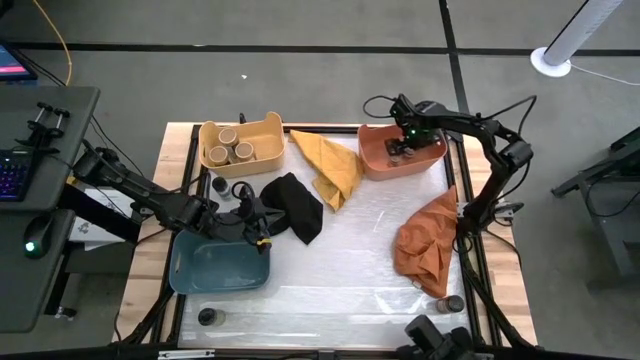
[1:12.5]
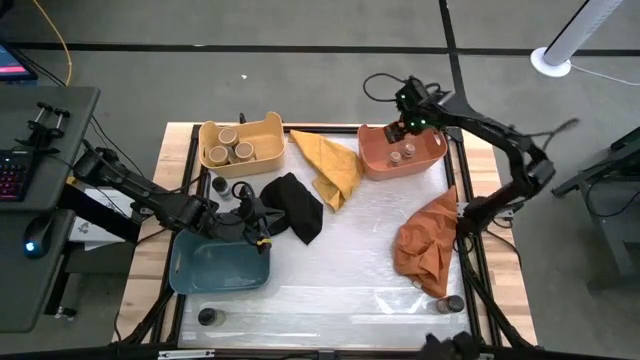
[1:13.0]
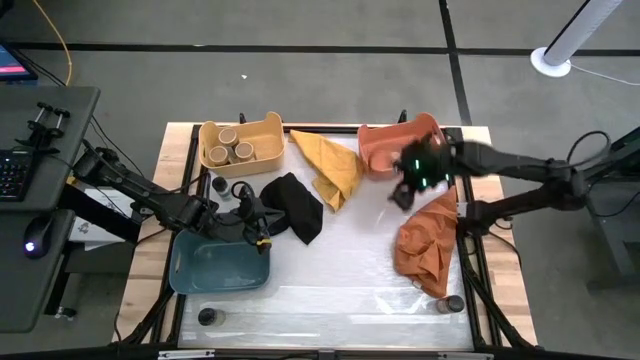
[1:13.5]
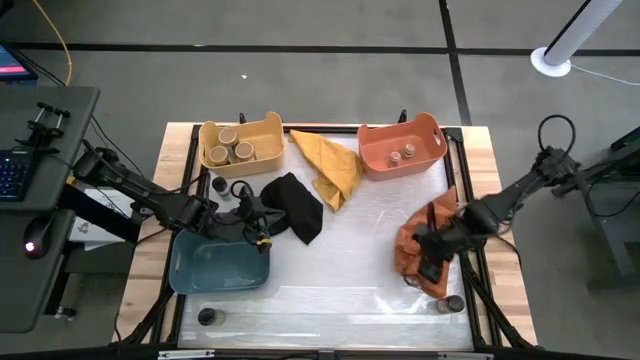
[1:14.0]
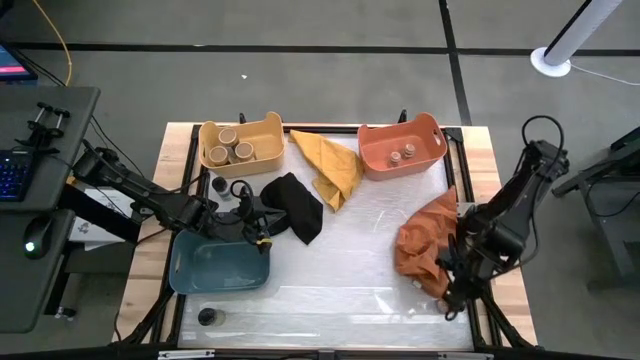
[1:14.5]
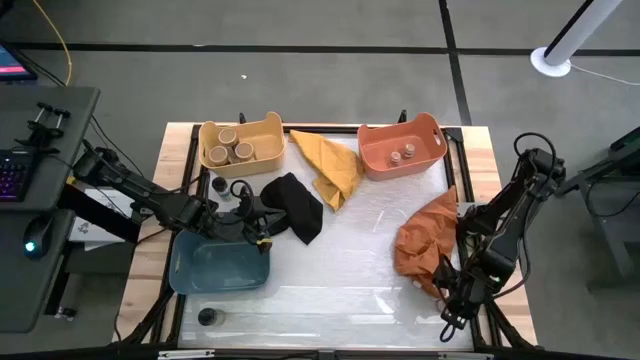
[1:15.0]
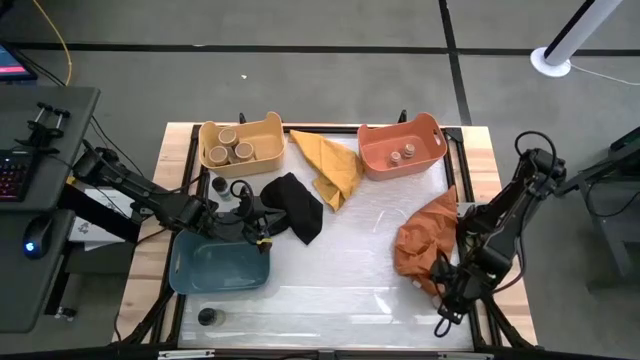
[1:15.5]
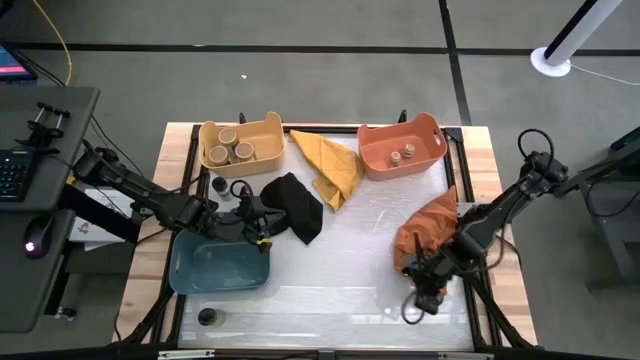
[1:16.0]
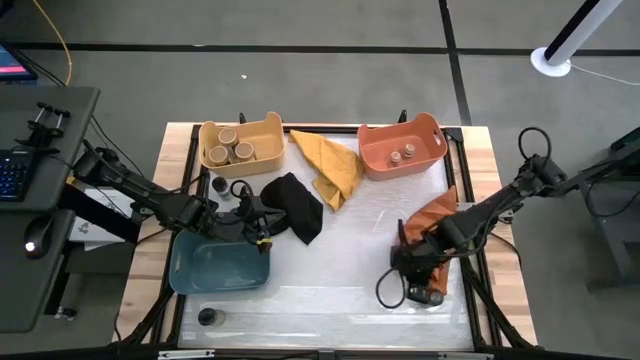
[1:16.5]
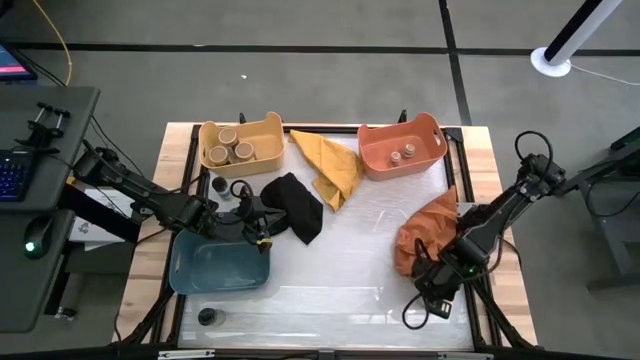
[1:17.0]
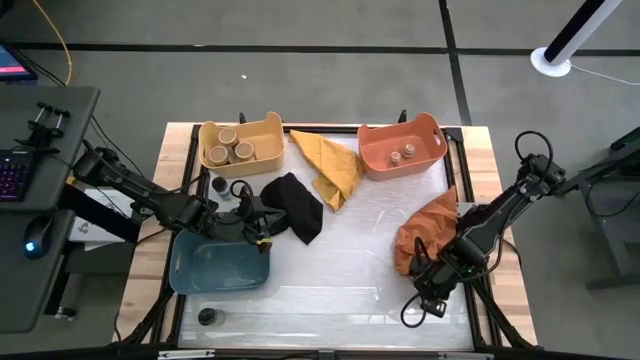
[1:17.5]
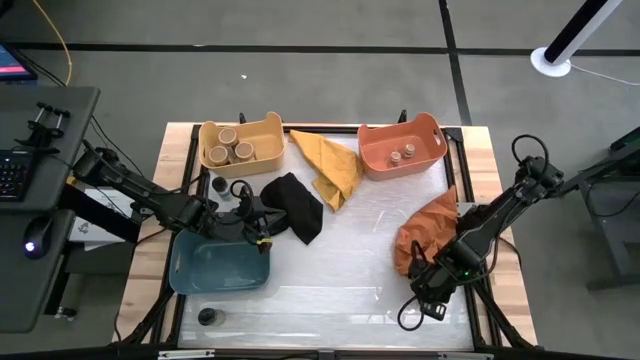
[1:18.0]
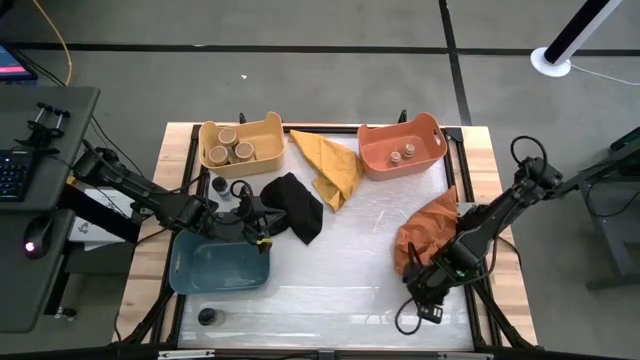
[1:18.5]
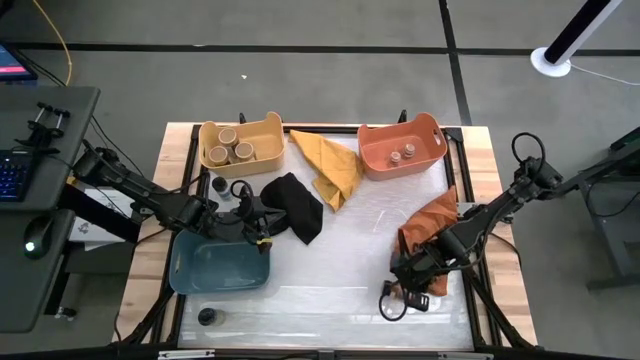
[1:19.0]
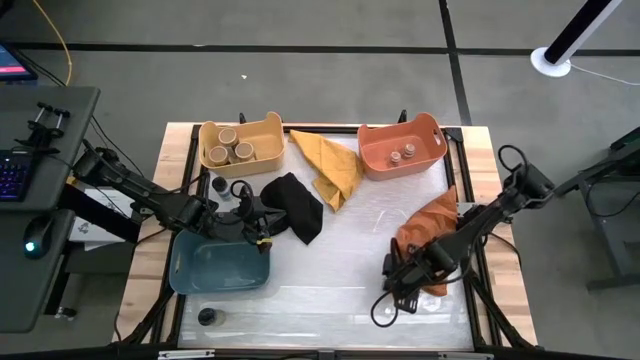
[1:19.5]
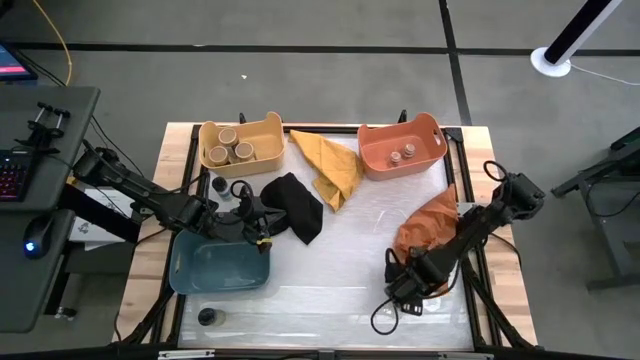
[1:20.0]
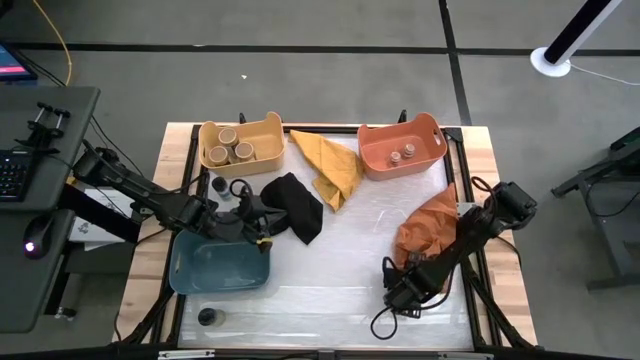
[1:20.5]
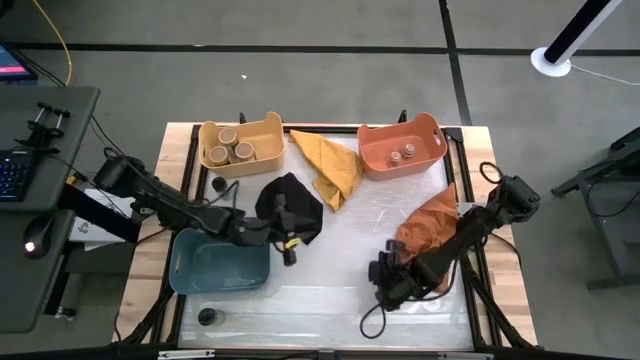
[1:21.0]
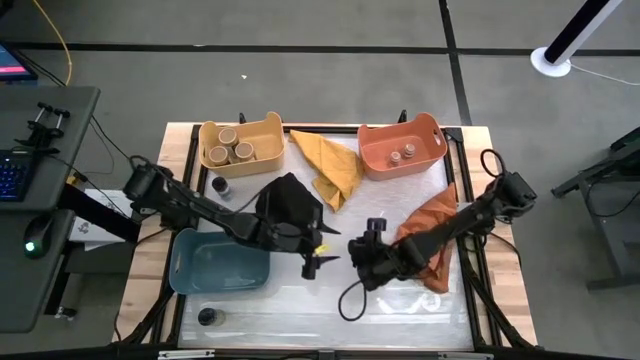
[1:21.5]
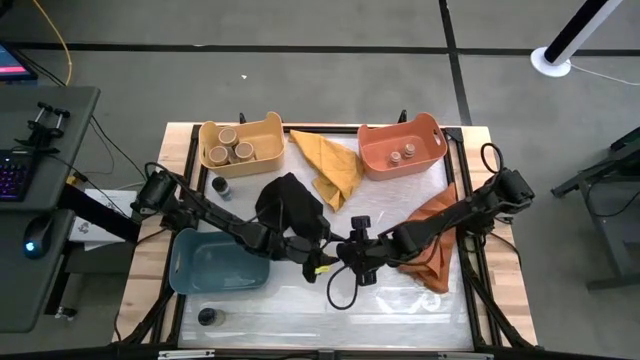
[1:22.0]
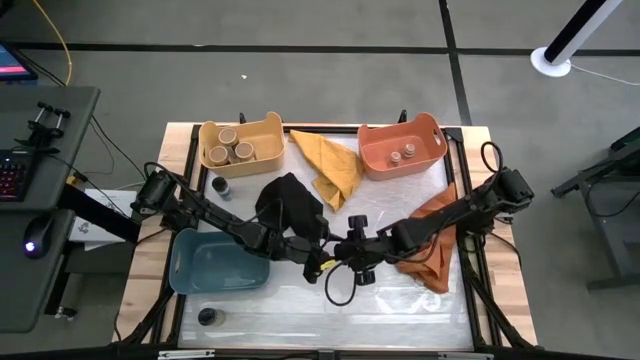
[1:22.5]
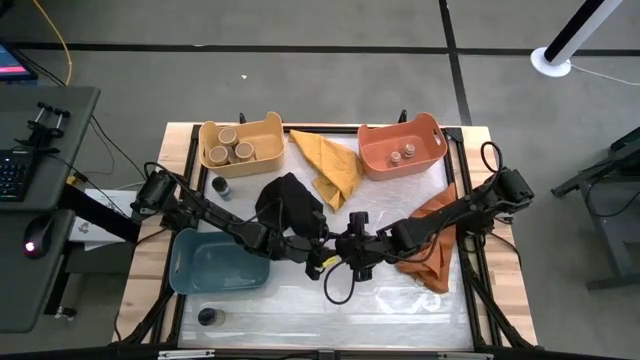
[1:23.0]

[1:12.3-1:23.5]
Task: Sort spices by type
Put the bottom right black spice bottle into the blue bin

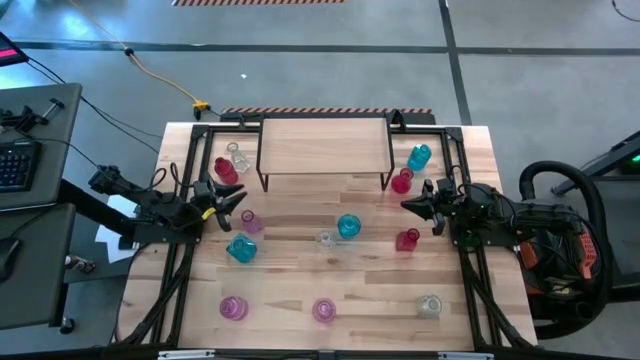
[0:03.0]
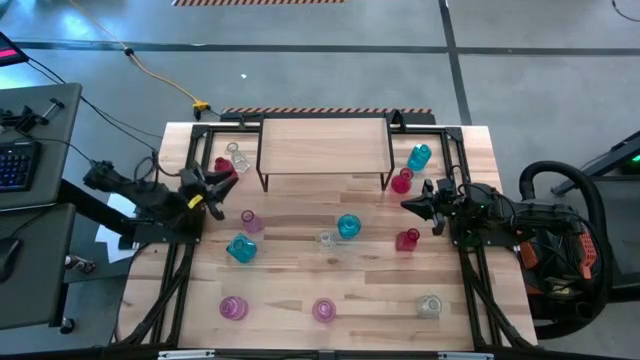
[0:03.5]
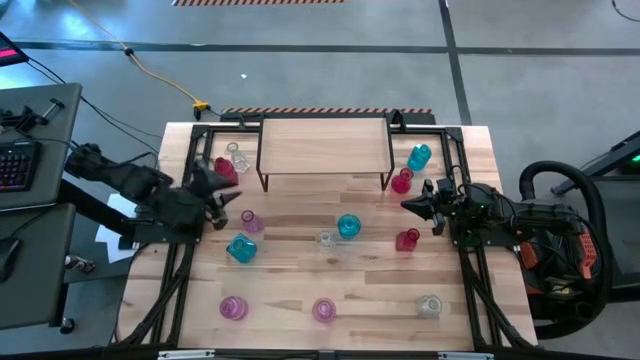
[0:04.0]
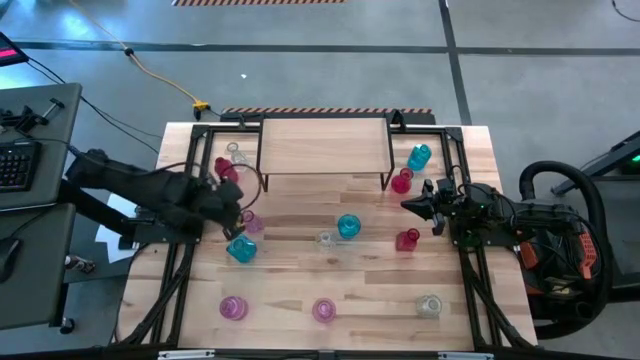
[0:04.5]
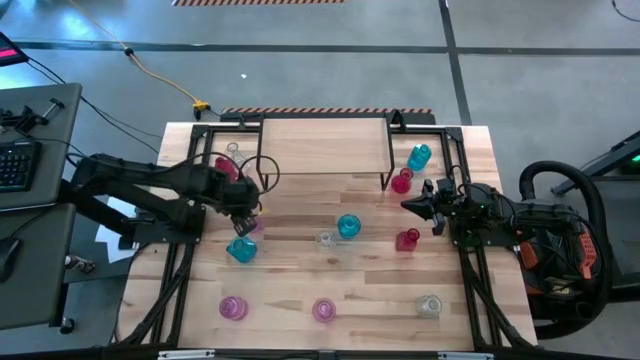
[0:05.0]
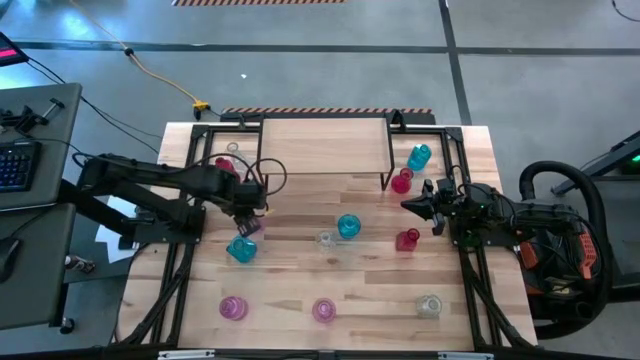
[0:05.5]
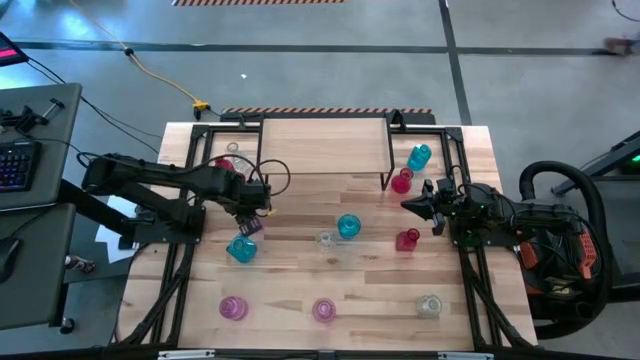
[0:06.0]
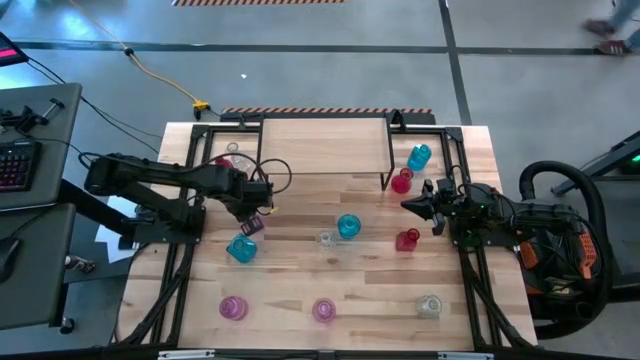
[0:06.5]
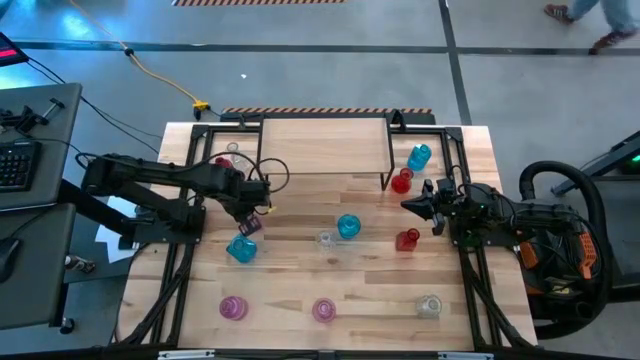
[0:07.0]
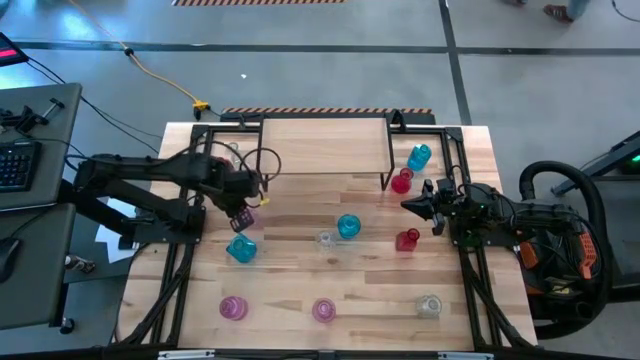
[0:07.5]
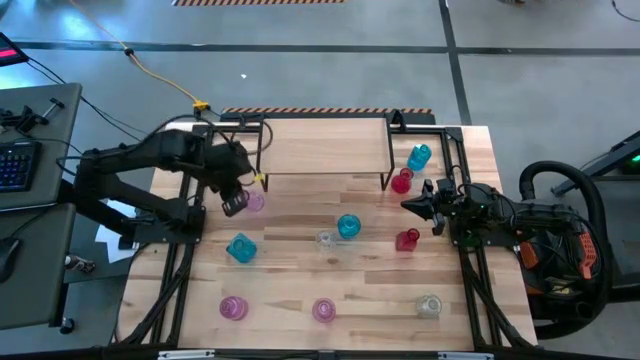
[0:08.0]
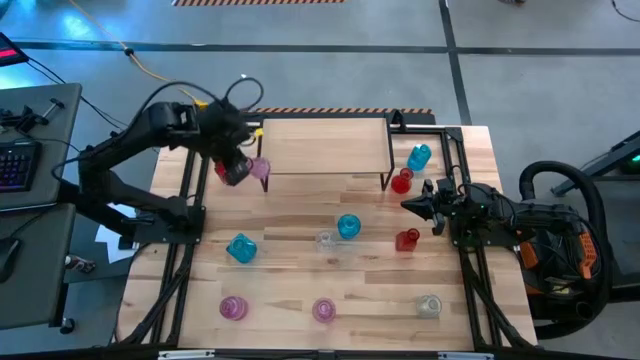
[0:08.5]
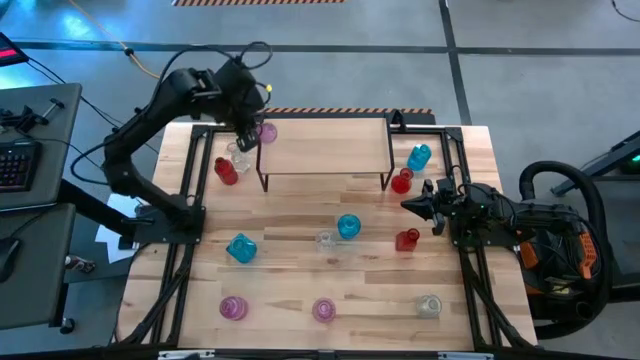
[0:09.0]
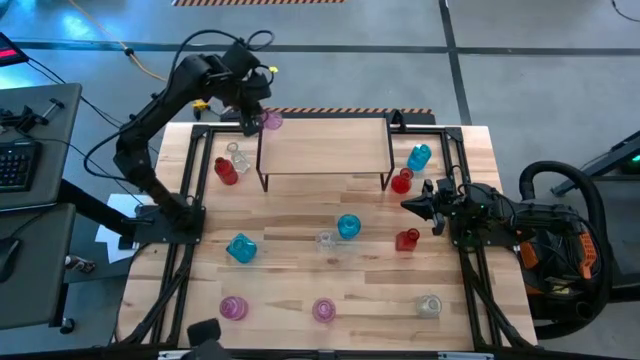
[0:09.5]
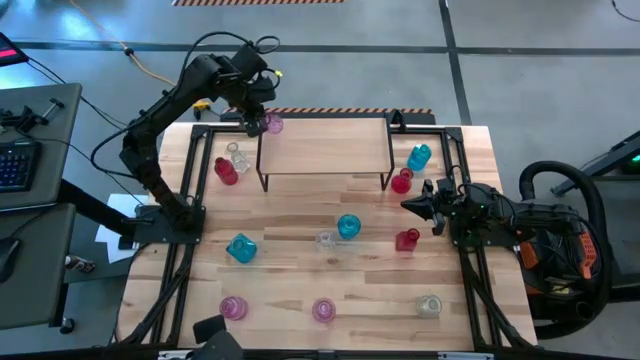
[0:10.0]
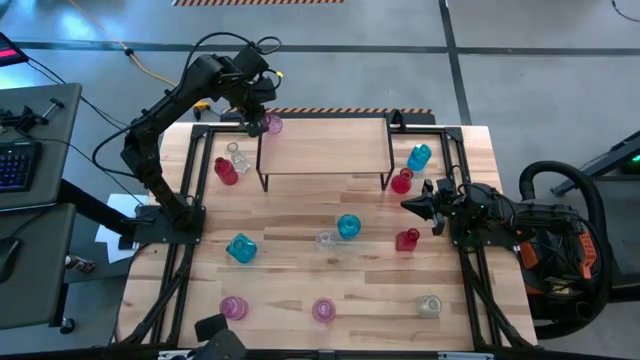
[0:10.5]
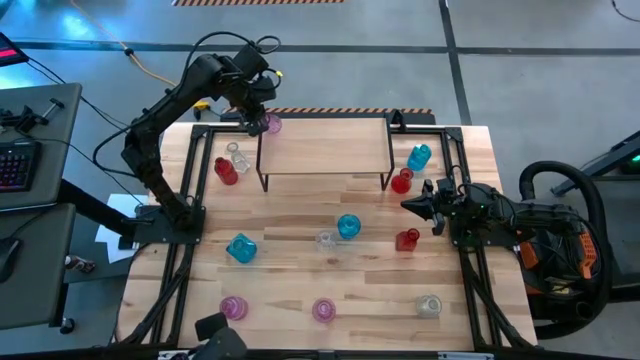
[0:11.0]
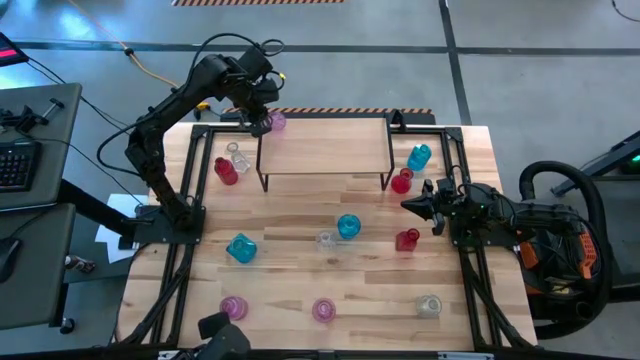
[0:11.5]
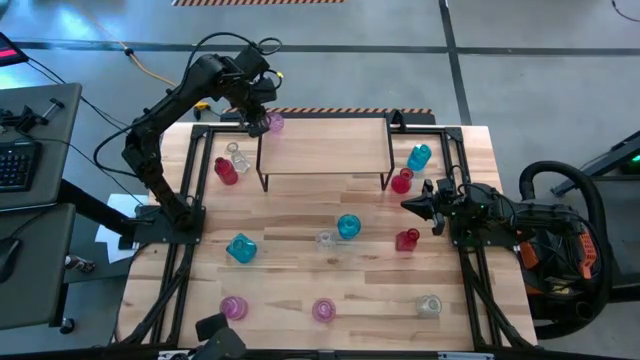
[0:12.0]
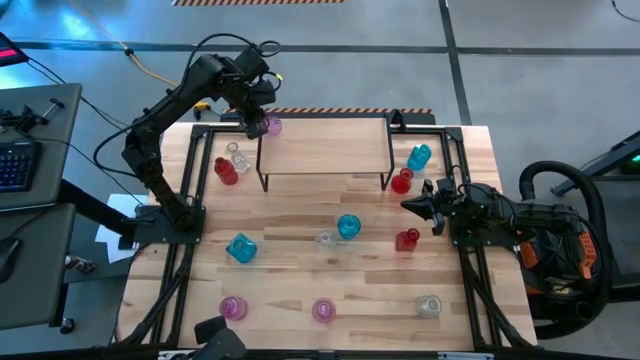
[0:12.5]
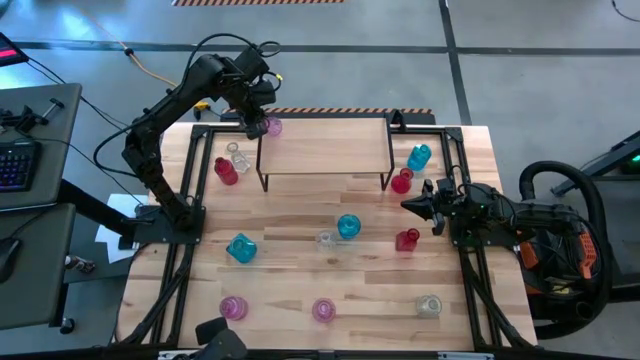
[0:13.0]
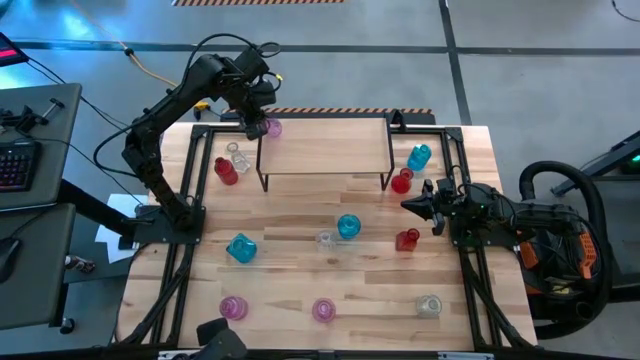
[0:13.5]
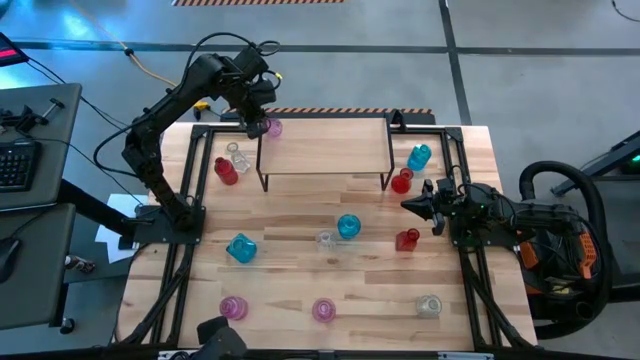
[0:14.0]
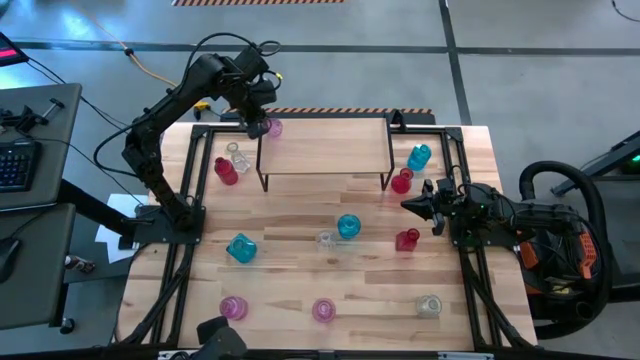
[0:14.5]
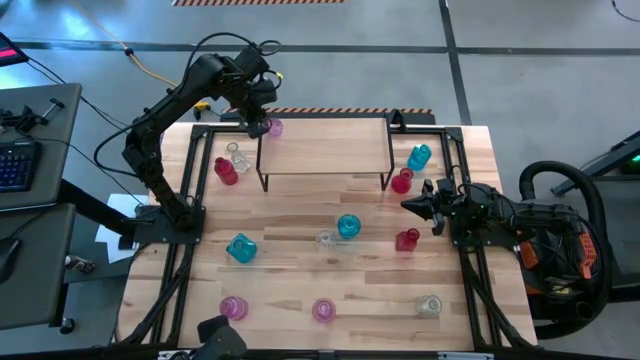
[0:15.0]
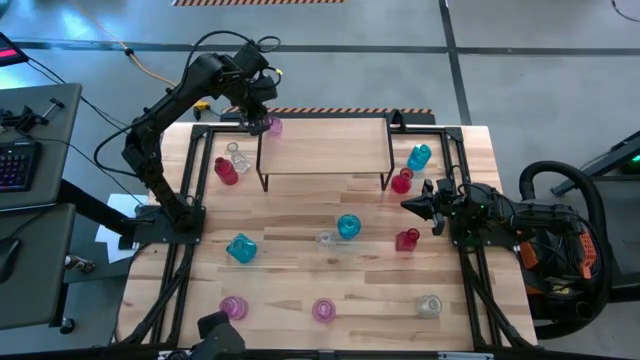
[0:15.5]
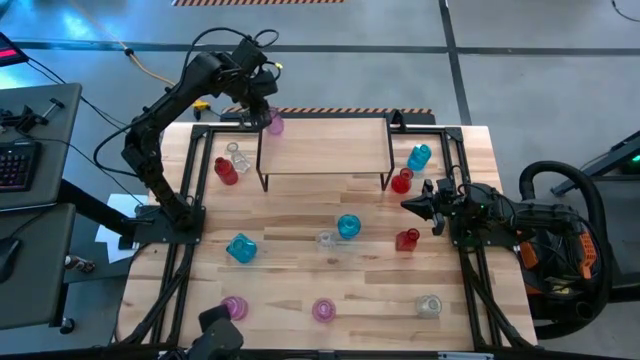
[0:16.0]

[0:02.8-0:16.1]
Task: sort vases onto shelf
Put the top light violet vase on the shelf
